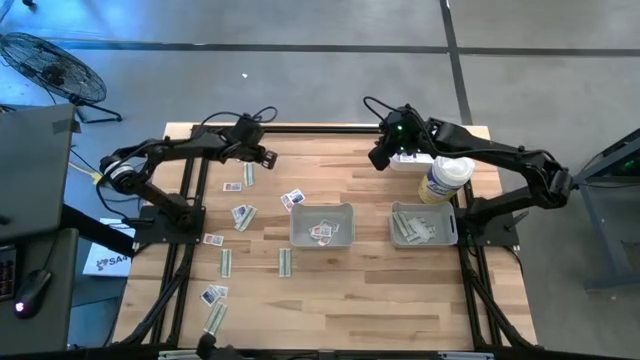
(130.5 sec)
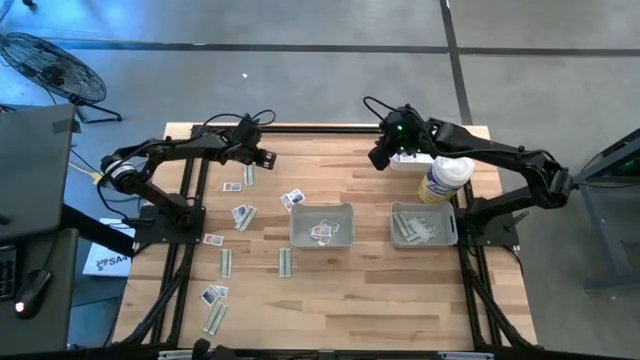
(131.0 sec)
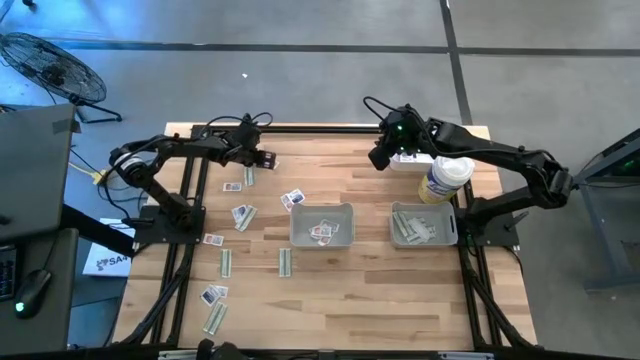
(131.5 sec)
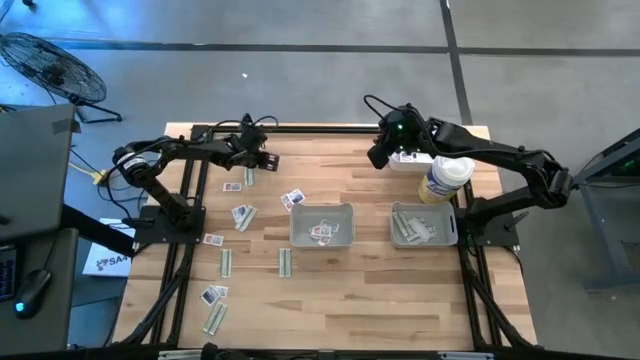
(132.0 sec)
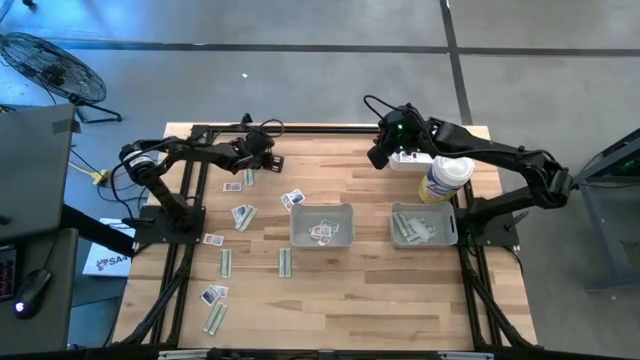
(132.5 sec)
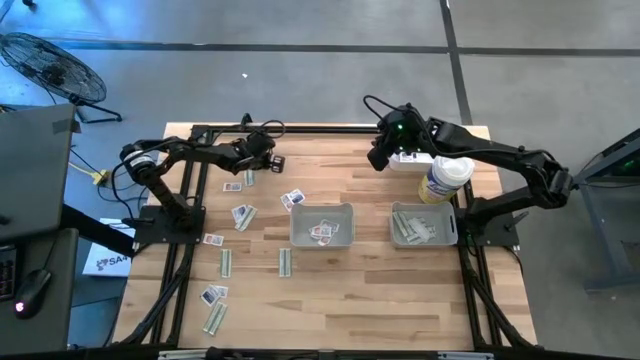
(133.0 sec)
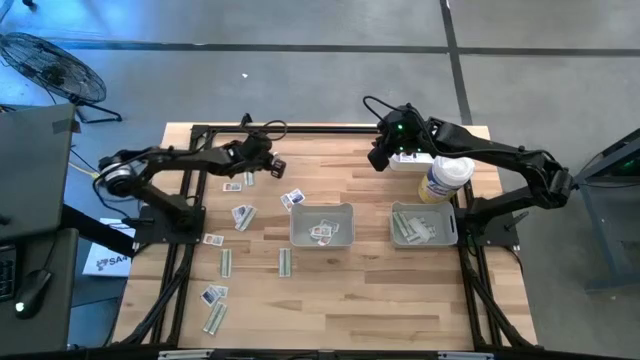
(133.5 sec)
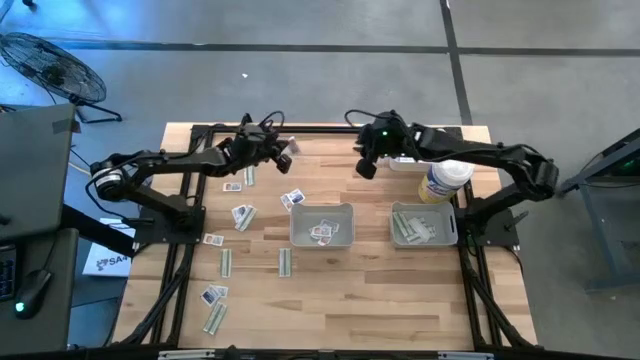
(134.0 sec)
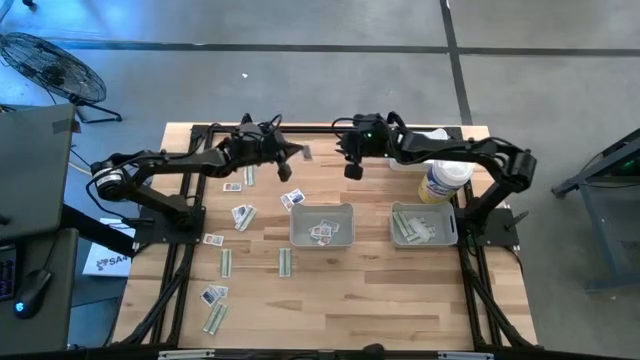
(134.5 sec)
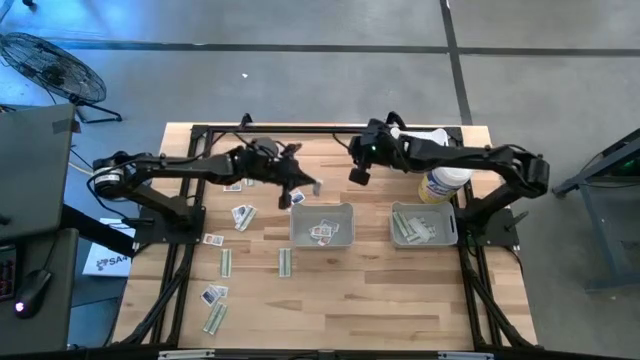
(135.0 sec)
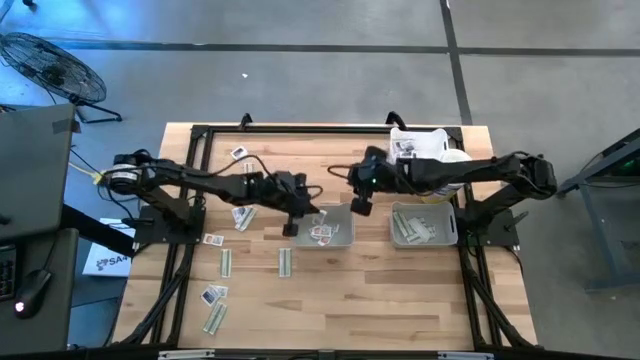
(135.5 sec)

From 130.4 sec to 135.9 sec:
Task: Pick & Place First Aid Supplies
Put the orange pad into the left gray bin

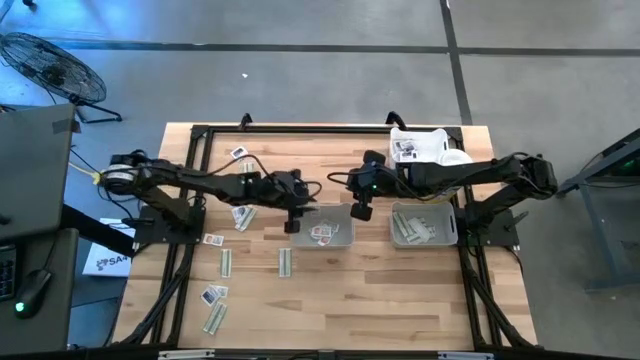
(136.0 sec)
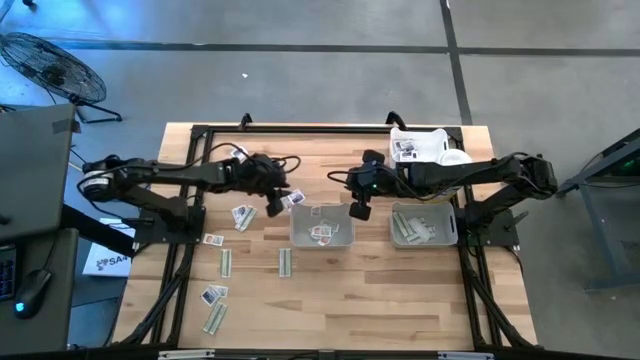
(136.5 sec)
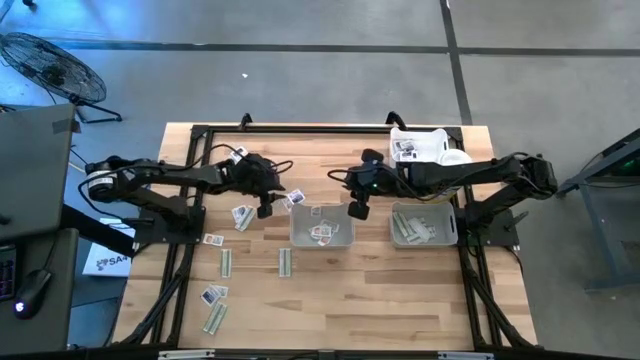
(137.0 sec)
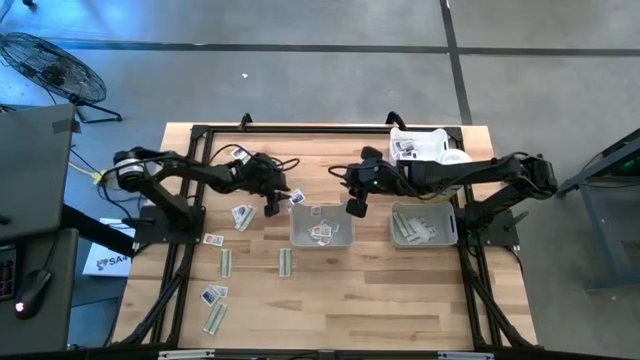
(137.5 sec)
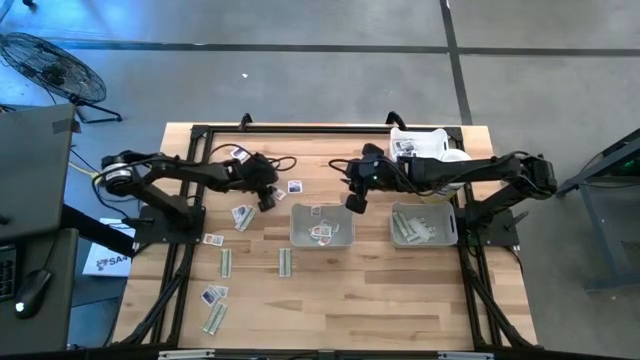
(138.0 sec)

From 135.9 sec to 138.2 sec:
Adjust the orange pad

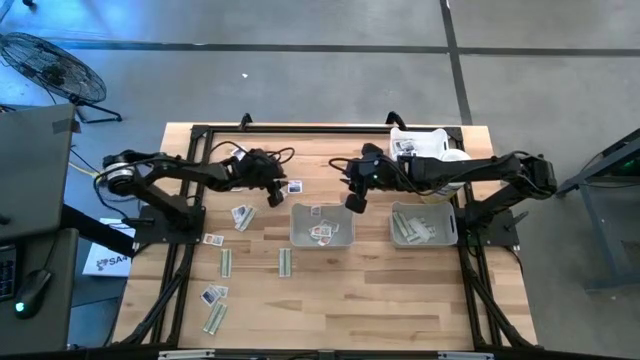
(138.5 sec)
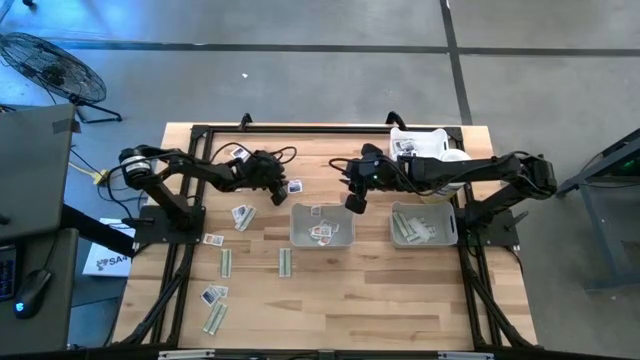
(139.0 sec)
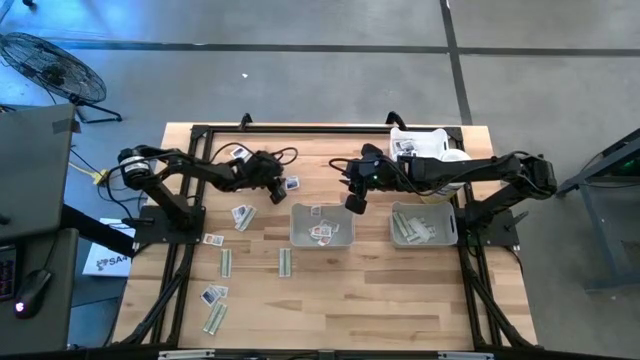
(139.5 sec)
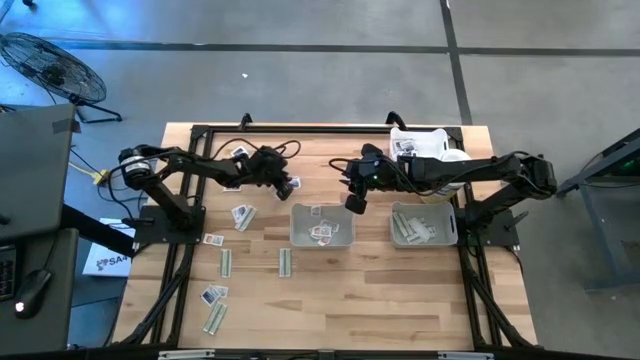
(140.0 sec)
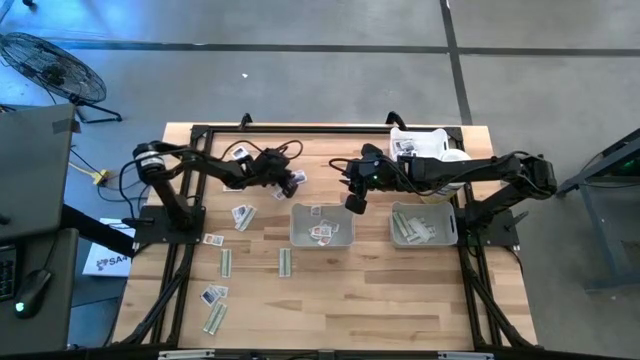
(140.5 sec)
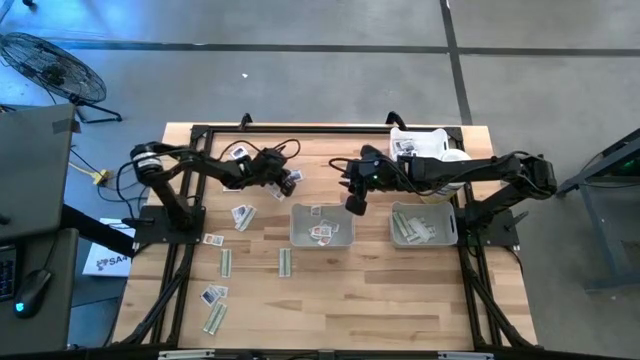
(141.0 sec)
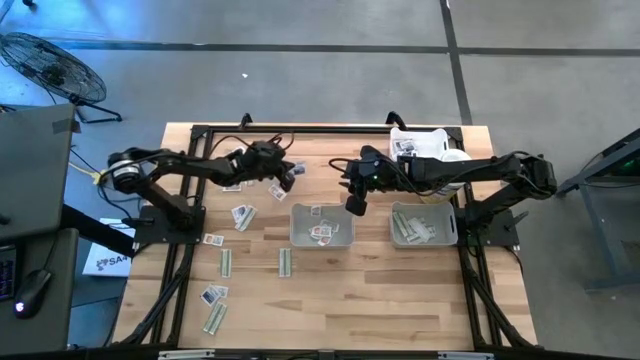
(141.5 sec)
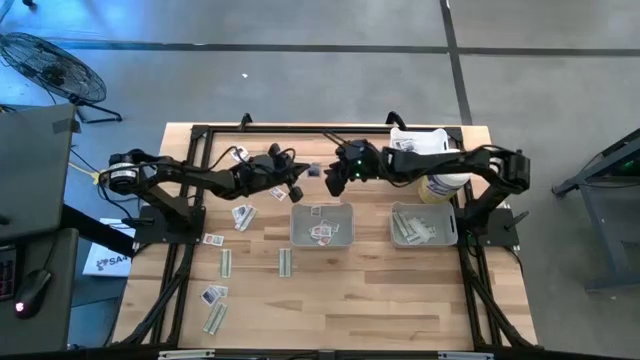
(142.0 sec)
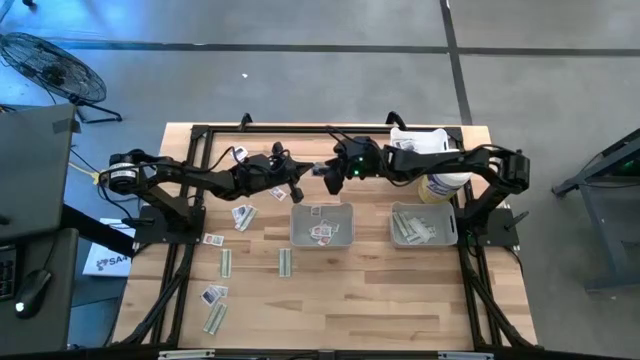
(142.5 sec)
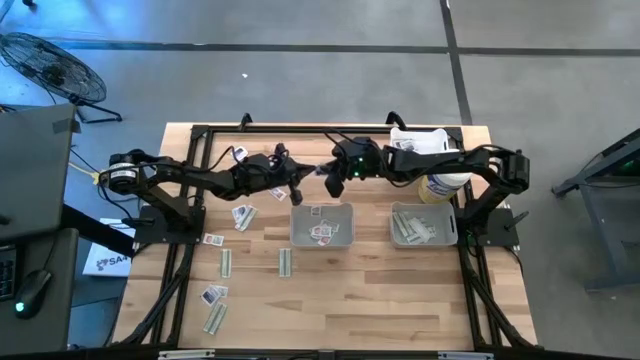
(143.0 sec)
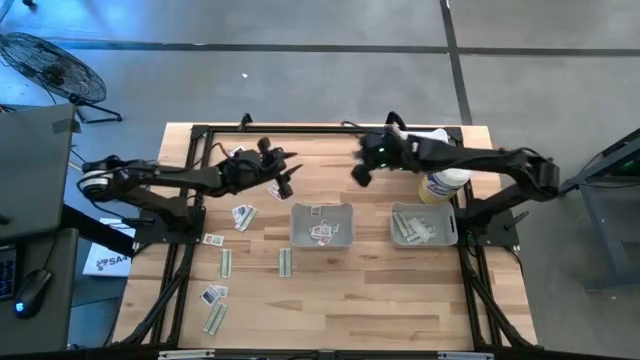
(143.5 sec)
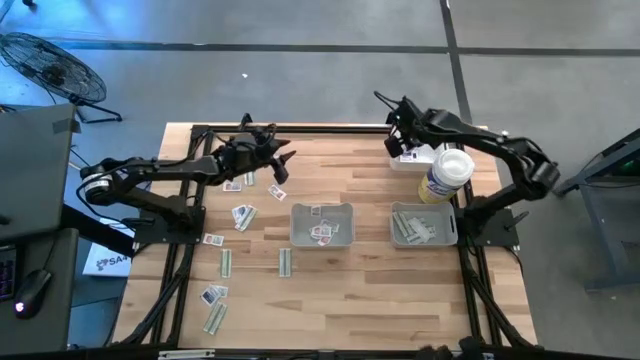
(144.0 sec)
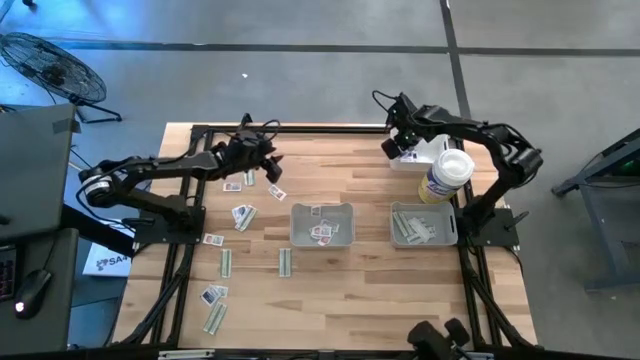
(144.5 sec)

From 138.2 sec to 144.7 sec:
Put the blue pad into the white bin

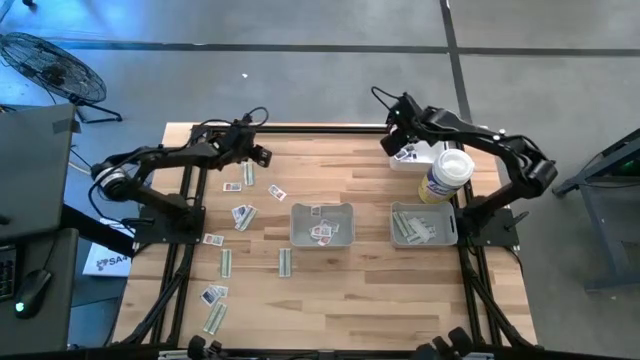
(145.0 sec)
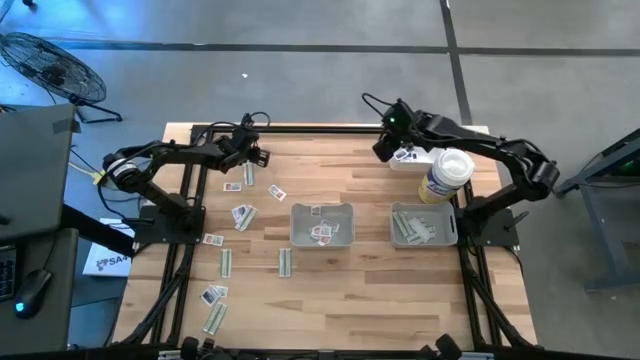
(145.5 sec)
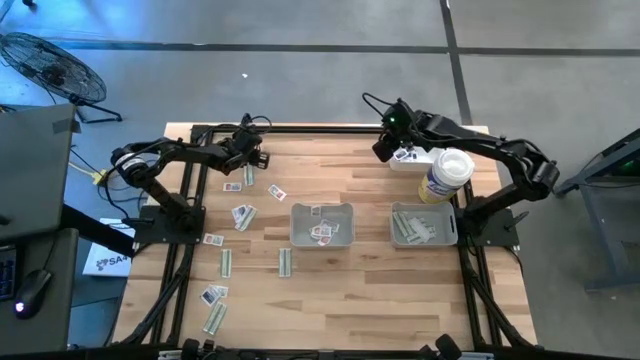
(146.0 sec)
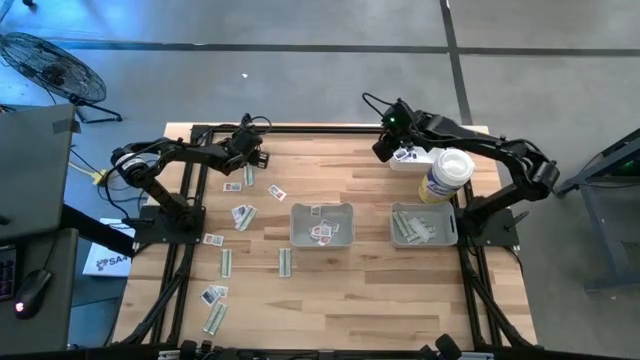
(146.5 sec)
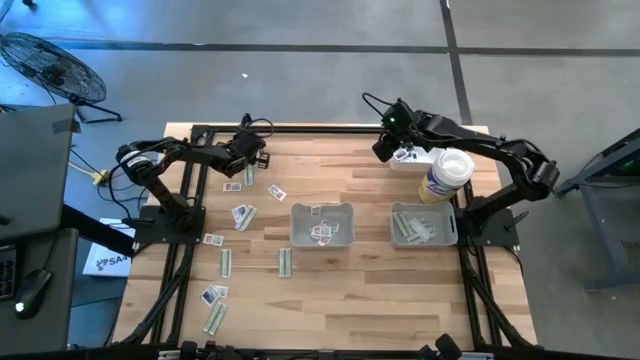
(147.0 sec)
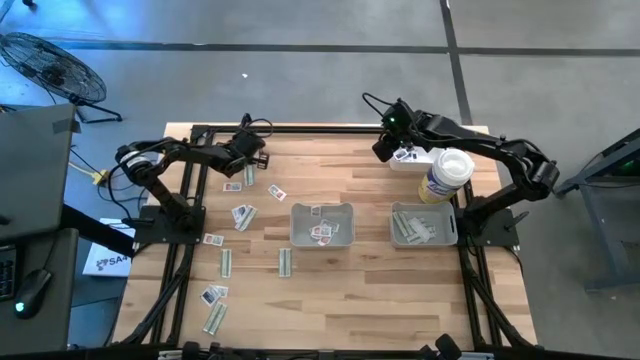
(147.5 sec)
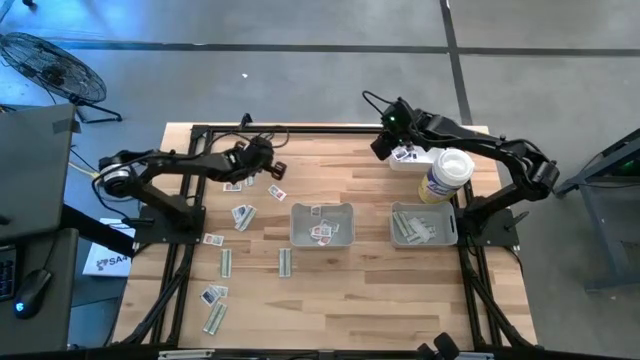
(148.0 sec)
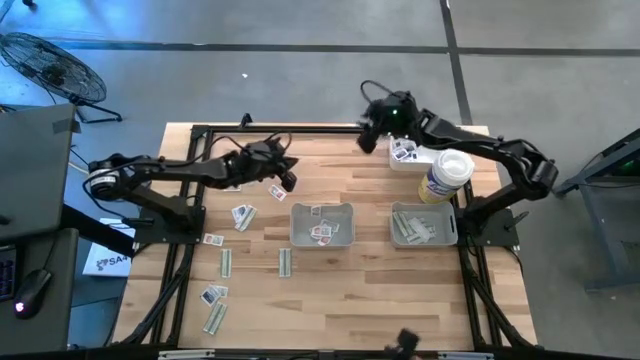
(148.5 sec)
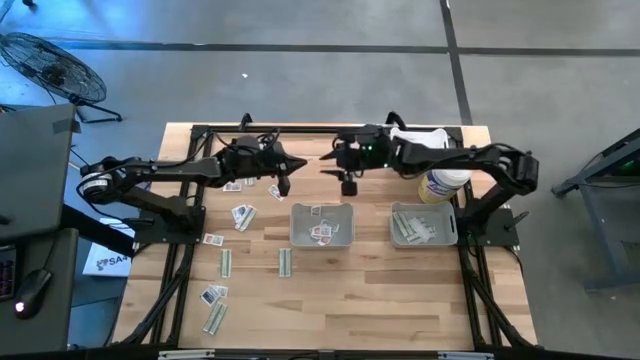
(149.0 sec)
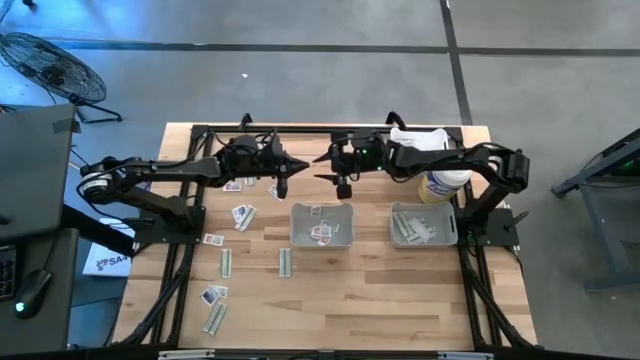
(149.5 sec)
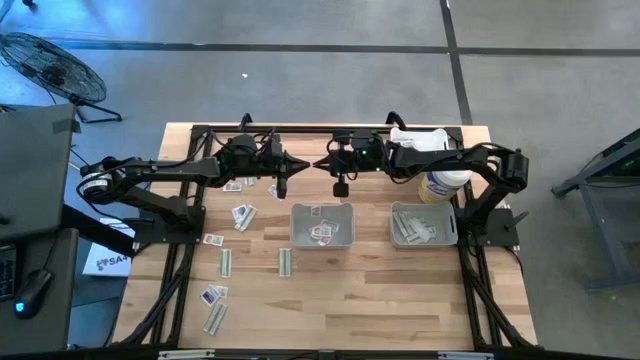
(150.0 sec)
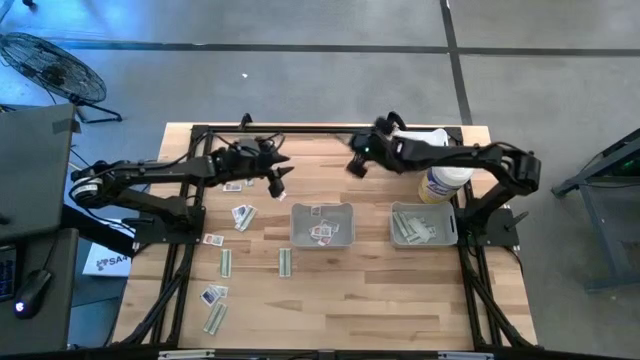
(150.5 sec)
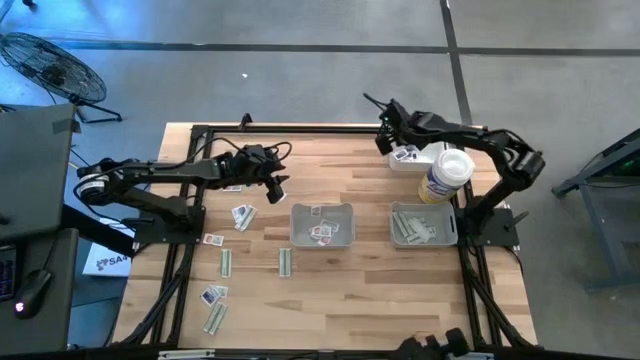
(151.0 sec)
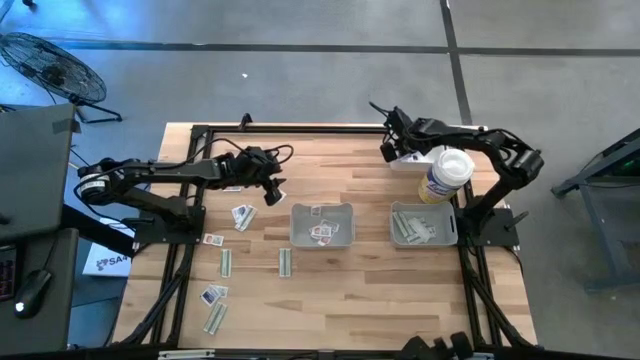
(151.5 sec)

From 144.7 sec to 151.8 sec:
Put the blue pad into the white bin
